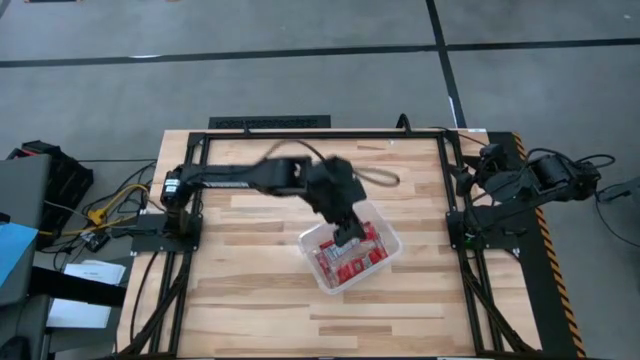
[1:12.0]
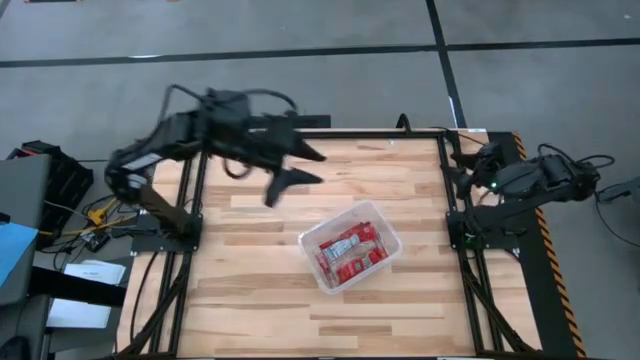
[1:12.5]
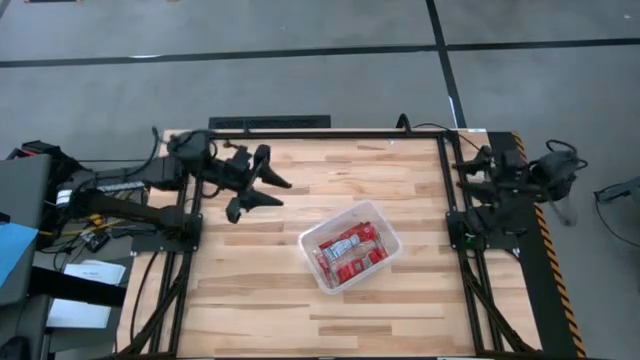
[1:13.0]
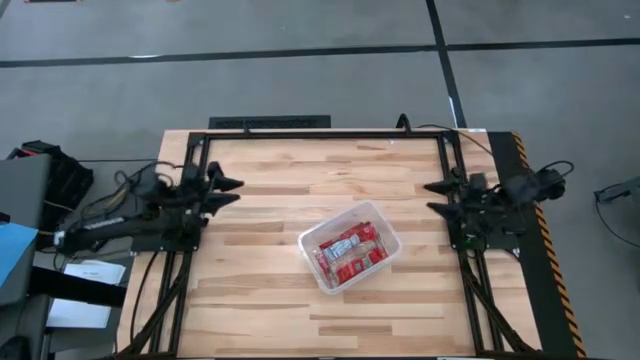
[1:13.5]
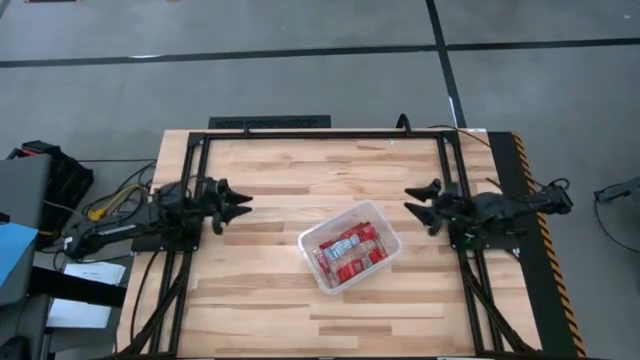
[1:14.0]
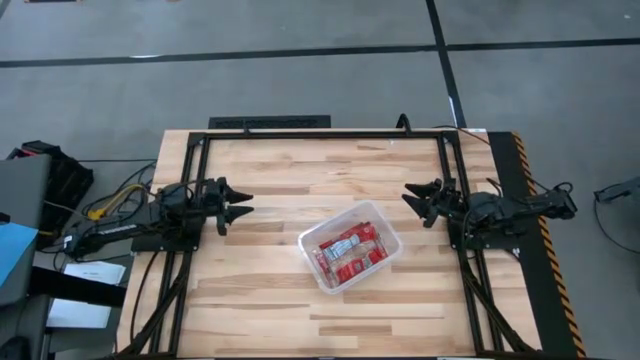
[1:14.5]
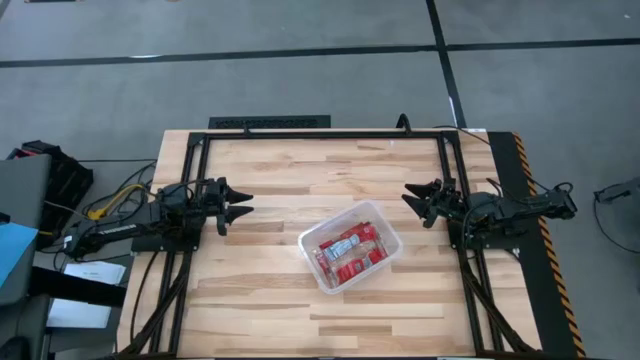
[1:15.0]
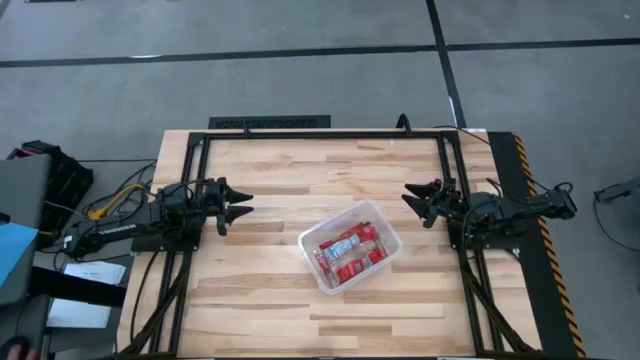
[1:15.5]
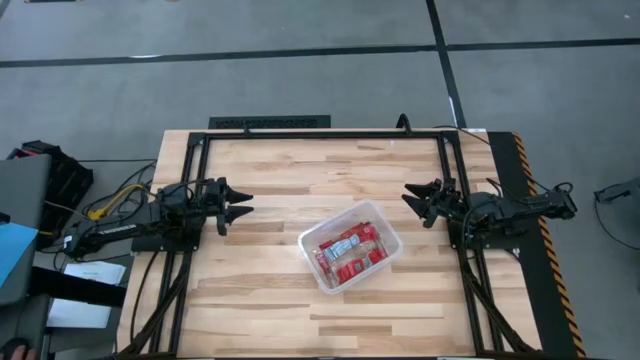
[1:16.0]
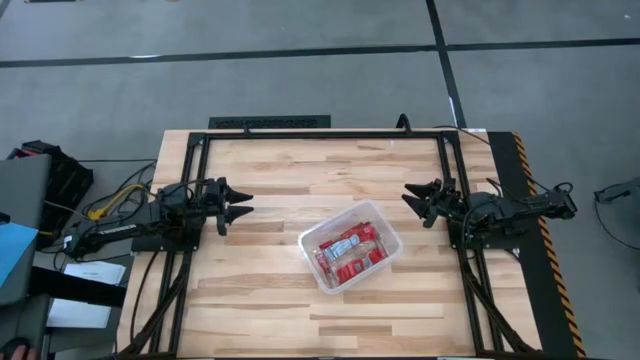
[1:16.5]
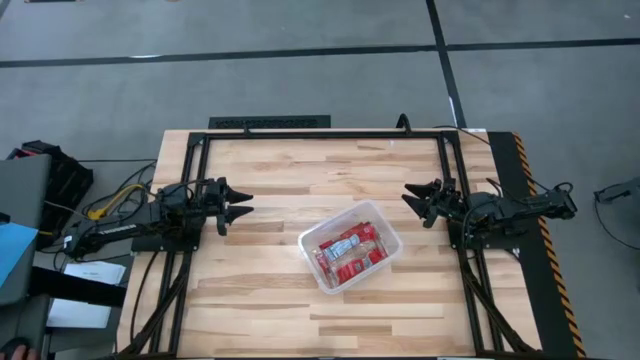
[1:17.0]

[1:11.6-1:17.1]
Task: Sort popcorn bags into baskets
Return to Home Position

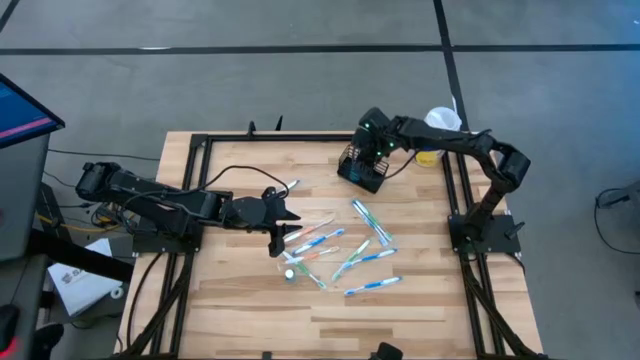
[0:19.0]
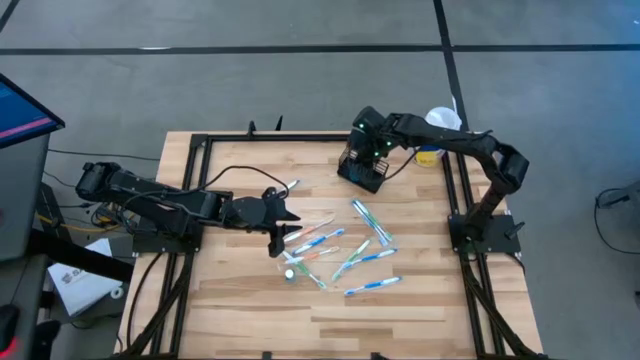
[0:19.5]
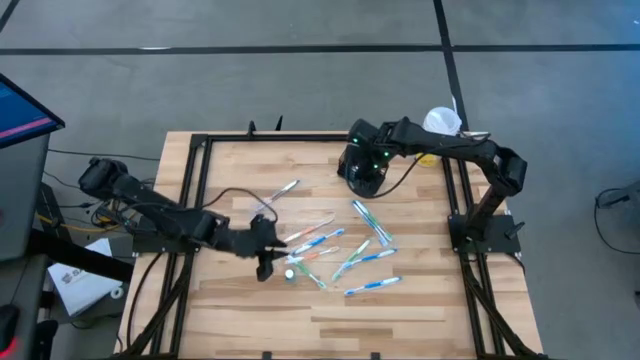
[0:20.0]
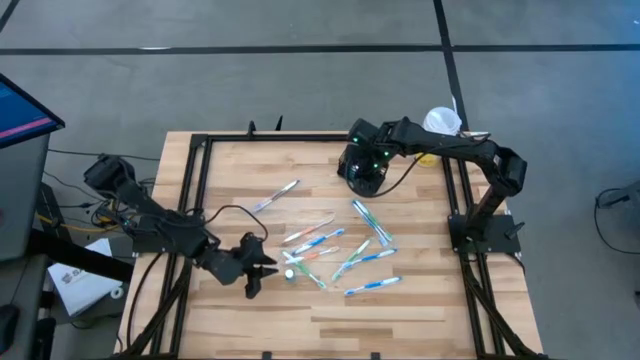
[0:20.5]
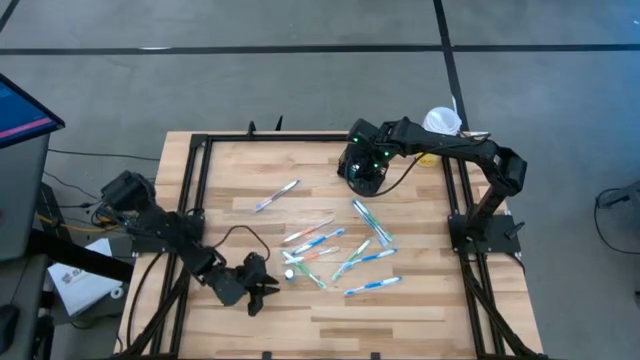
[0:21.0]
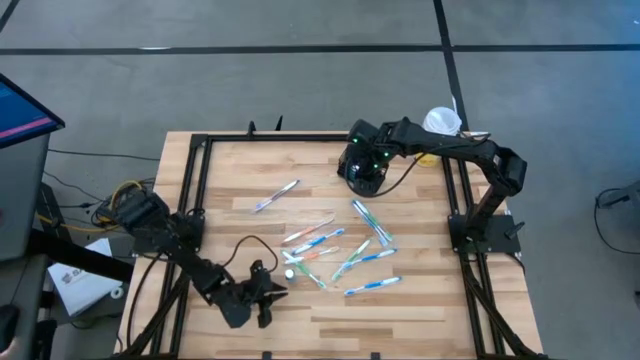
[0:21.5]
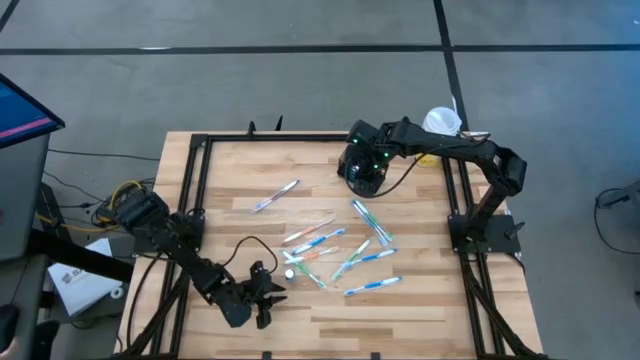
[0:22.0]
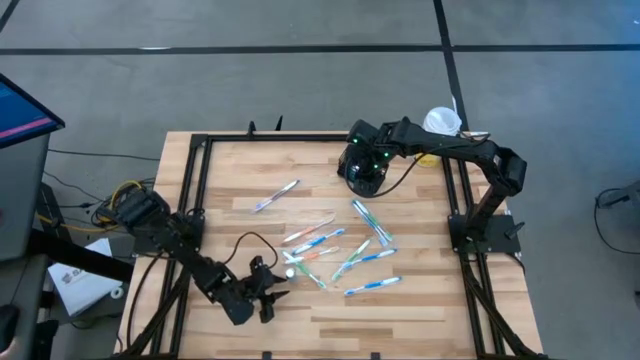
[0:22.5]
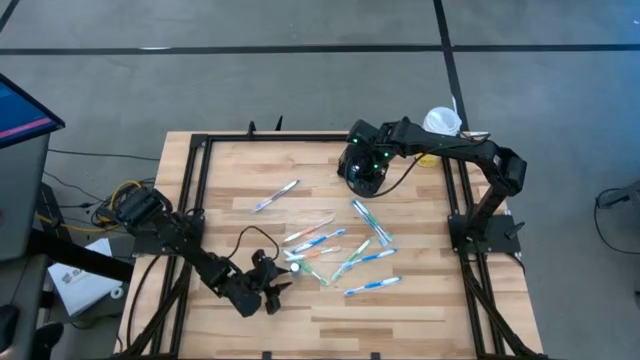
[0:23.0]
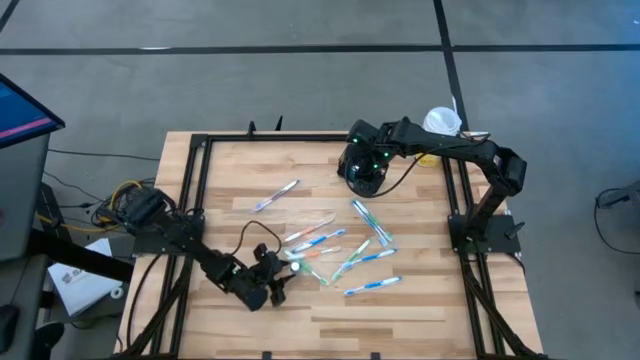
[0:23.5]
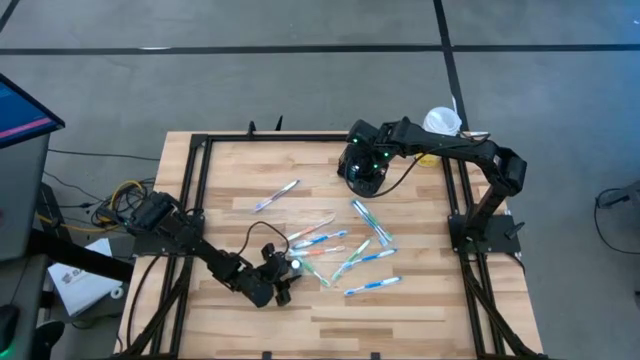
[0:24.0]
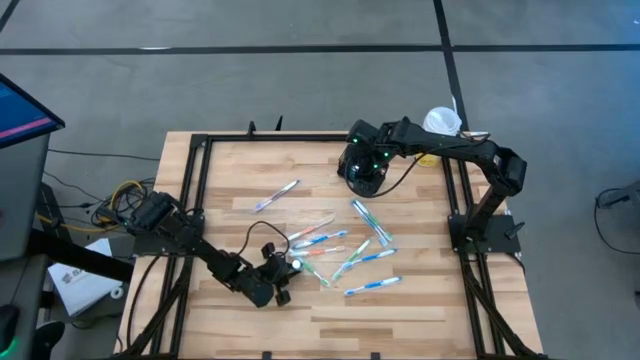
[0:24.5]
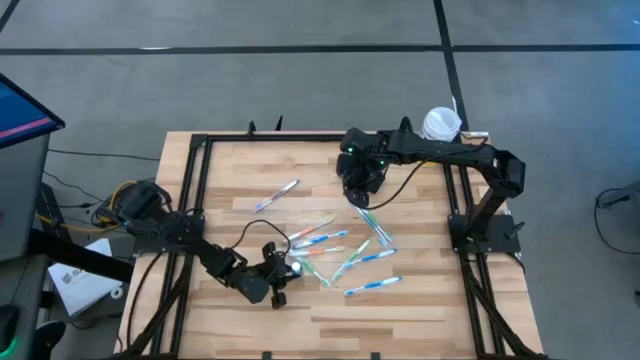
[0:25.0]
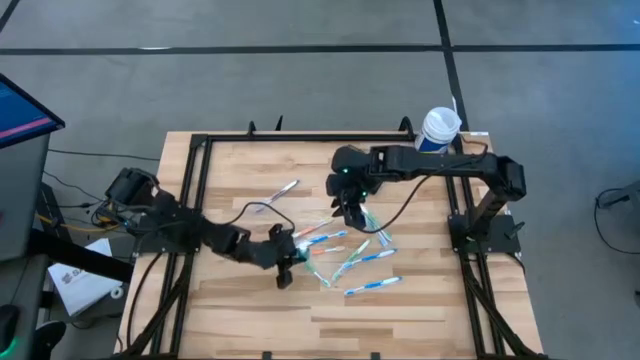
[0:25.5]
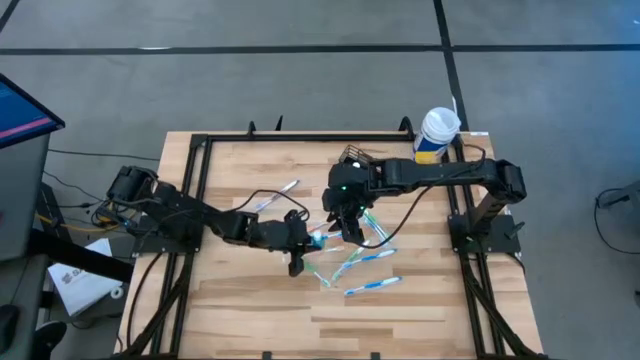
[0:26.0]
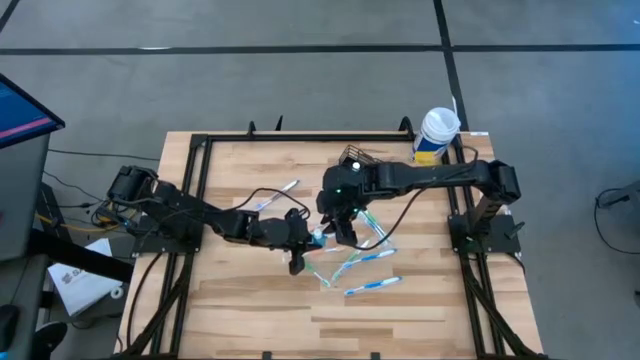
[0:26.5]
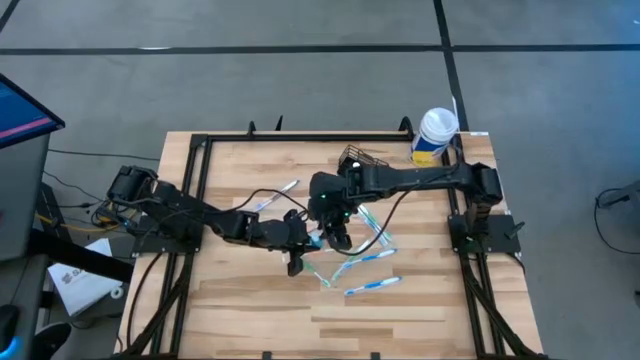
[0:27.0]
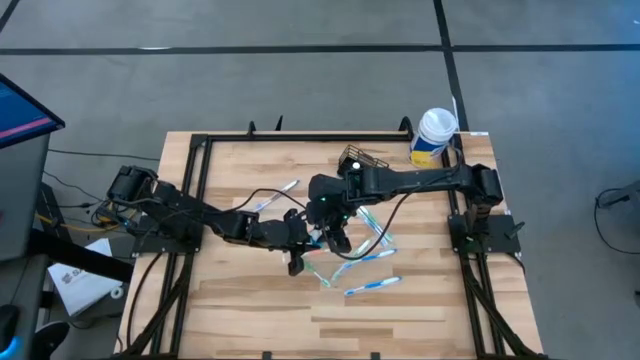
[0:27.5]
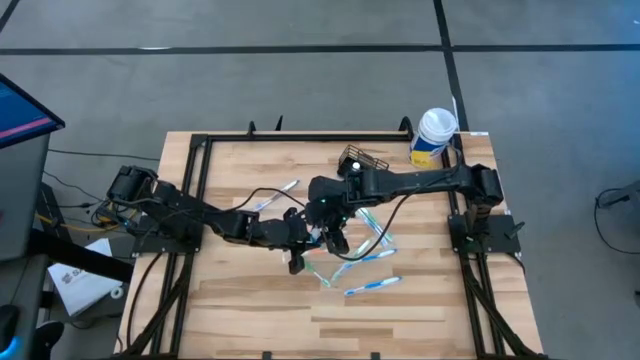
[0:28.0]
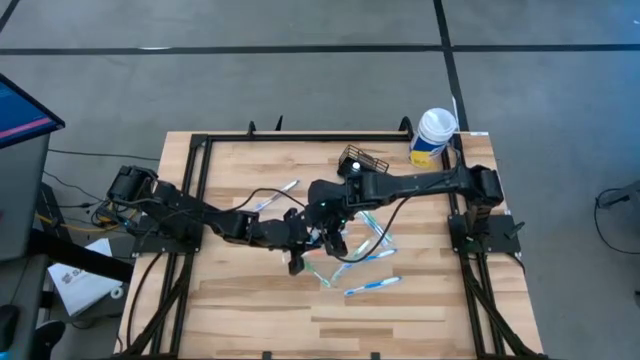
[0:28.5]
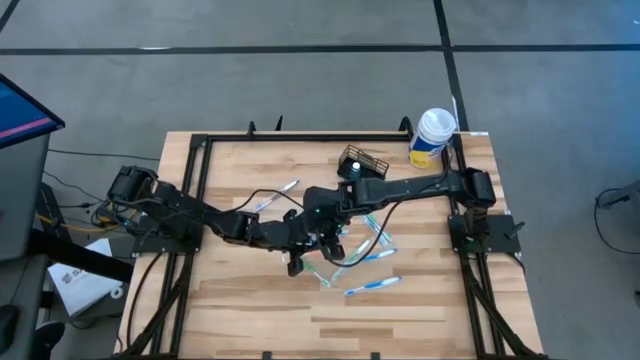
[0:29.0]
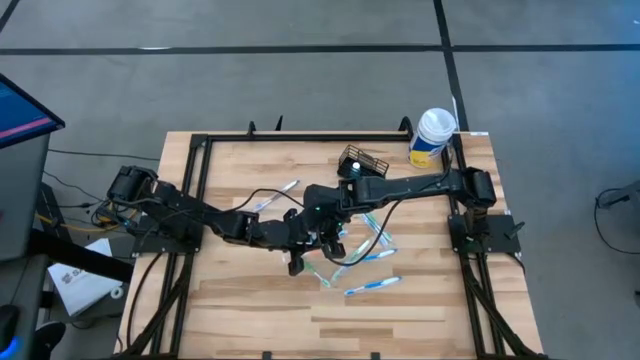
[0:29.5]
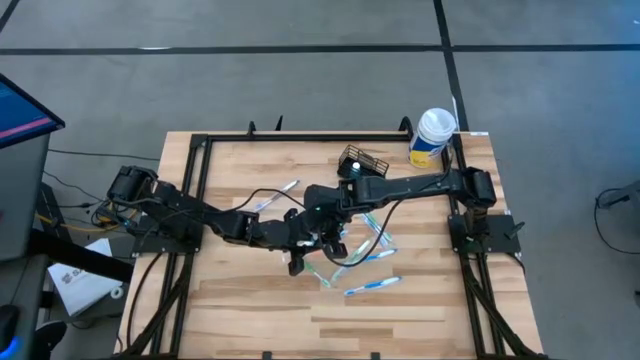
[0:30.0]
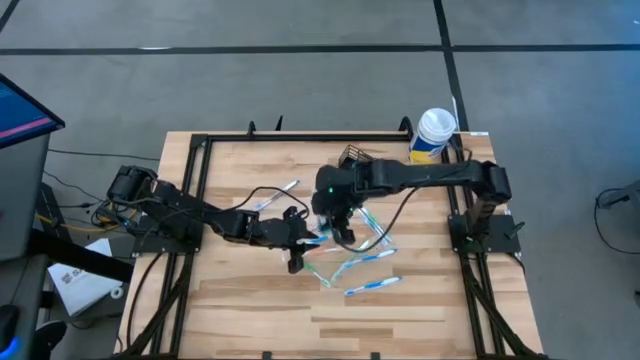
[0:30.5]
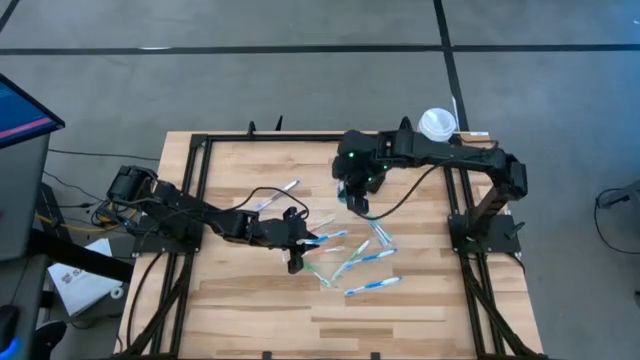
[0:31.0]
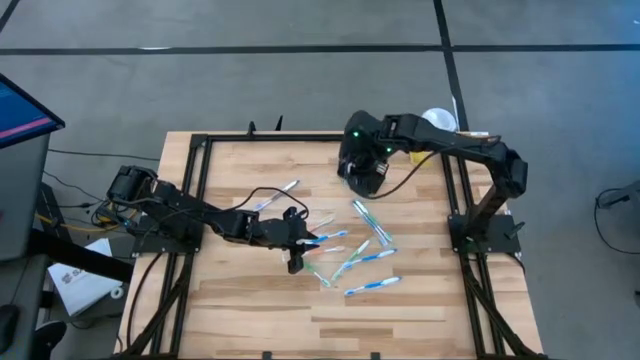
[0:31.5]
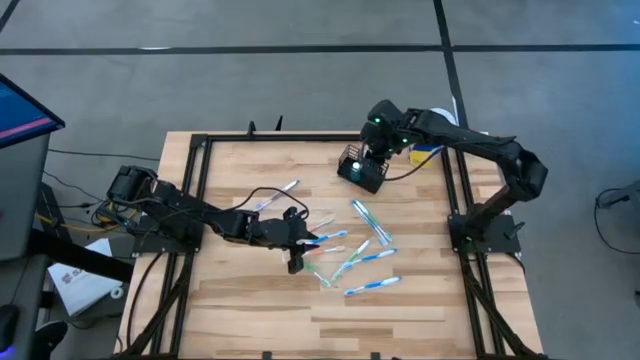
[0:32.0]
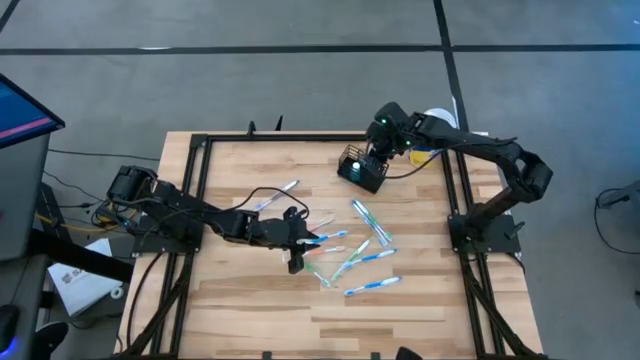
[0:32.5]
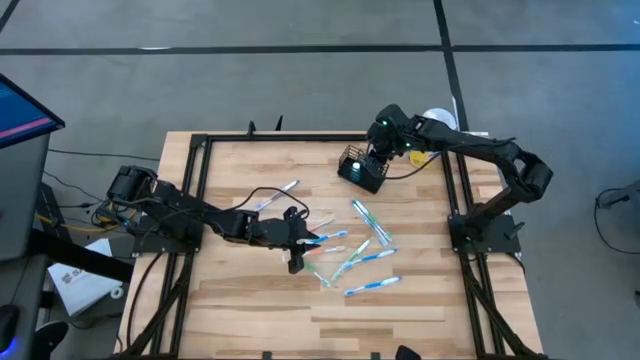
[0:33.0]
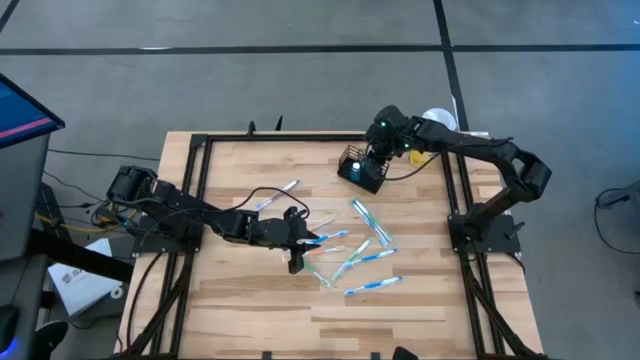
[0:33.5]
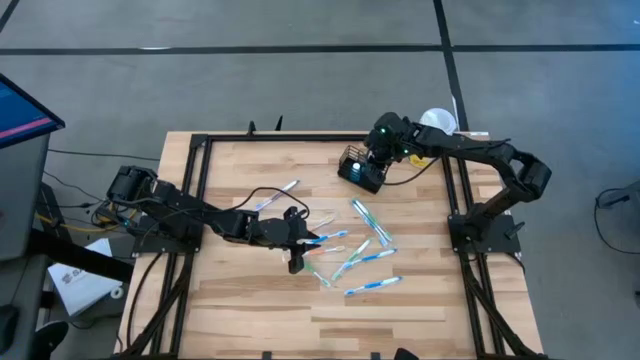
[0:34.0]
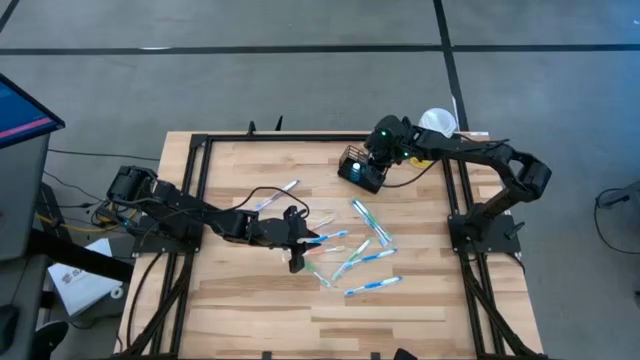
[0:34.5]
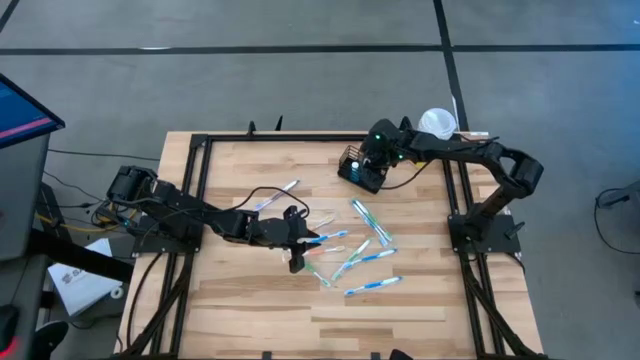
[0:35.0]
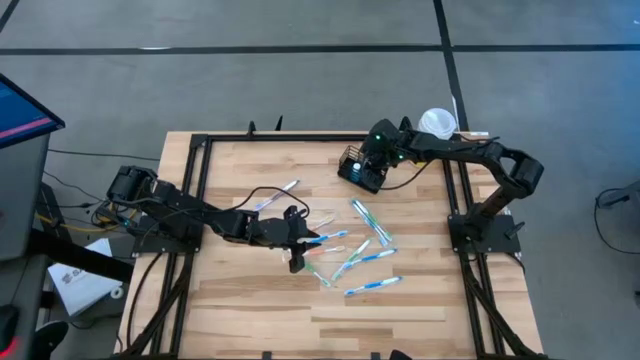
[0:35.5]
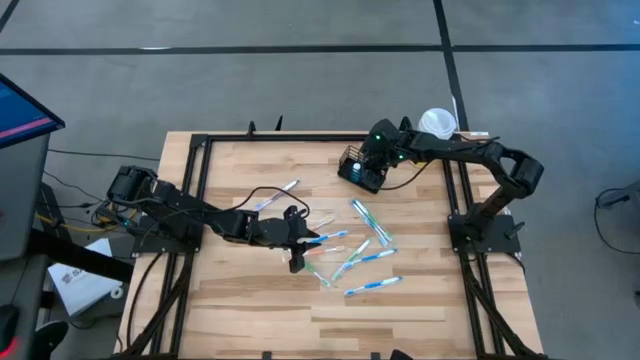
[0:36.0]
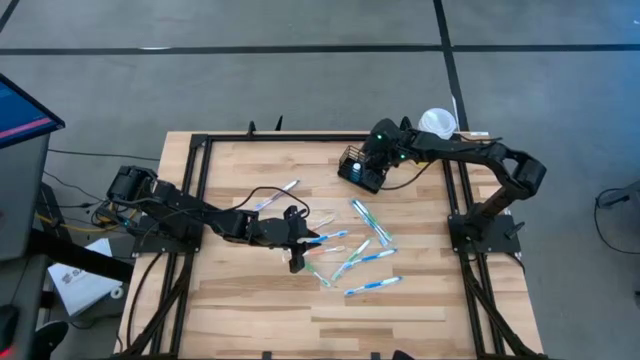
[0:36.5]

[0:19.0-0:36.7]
Task: Pick & Place toothbrushing station
Put the mouthwash bottle into the mesh organizer
